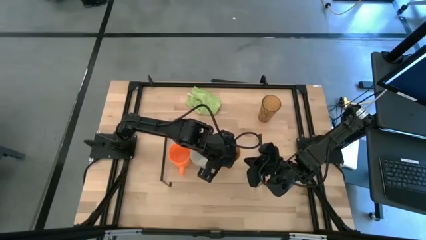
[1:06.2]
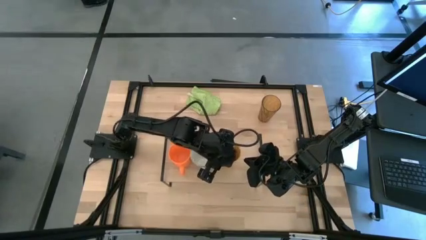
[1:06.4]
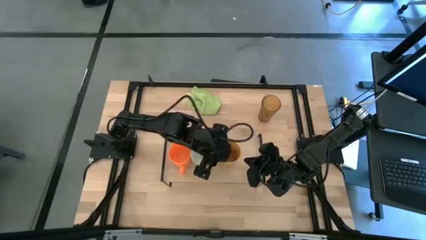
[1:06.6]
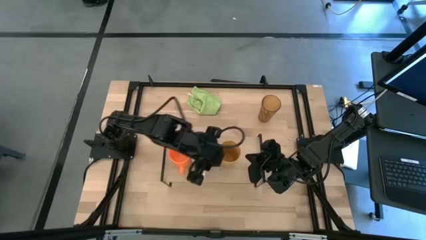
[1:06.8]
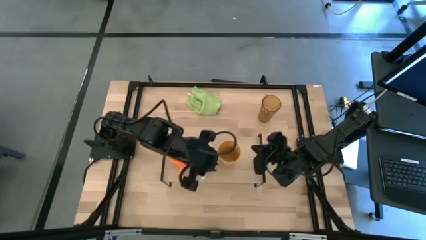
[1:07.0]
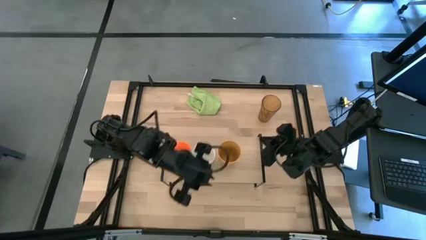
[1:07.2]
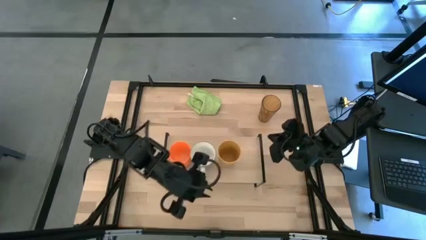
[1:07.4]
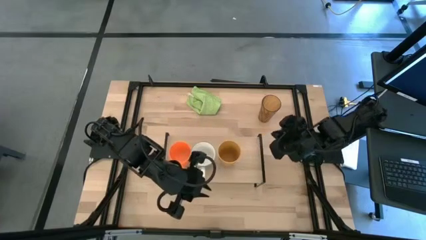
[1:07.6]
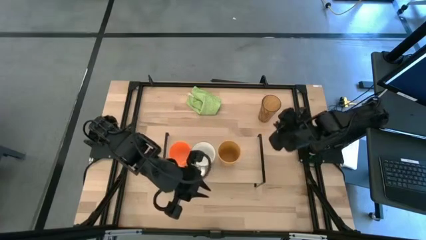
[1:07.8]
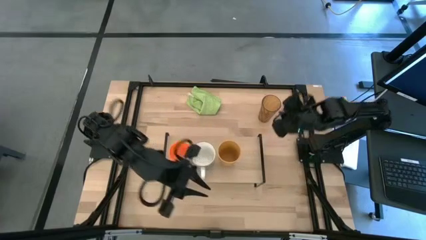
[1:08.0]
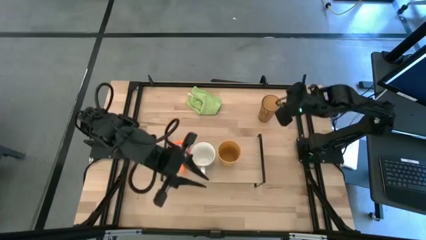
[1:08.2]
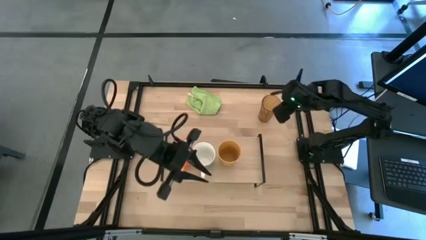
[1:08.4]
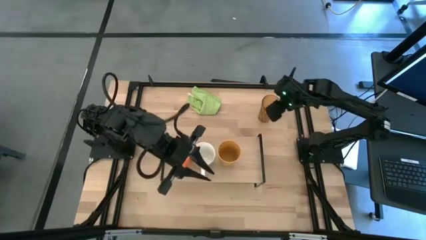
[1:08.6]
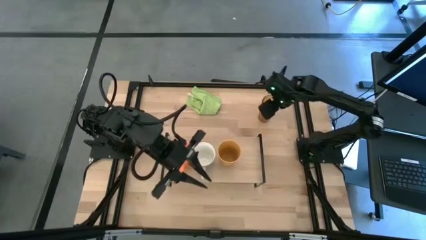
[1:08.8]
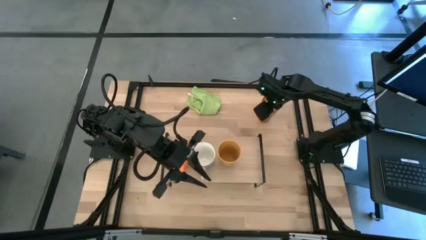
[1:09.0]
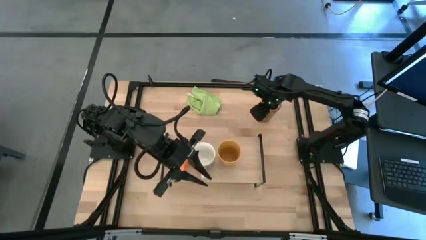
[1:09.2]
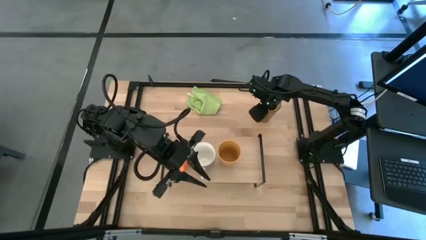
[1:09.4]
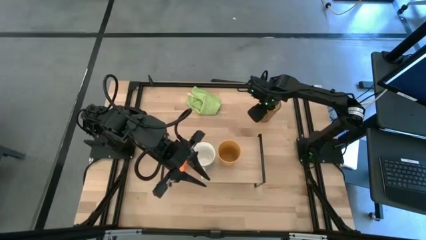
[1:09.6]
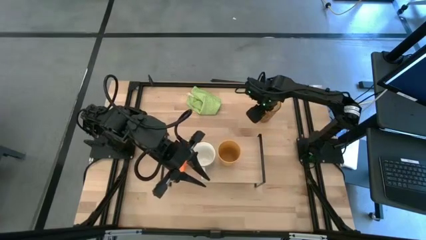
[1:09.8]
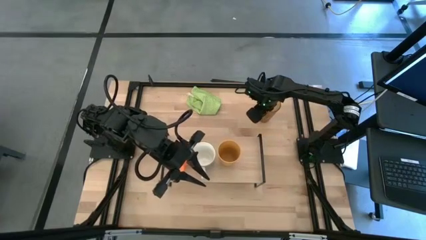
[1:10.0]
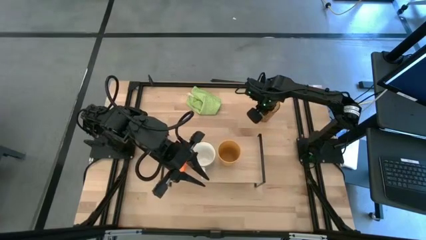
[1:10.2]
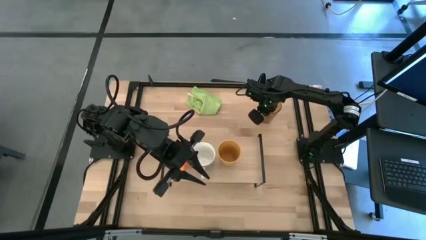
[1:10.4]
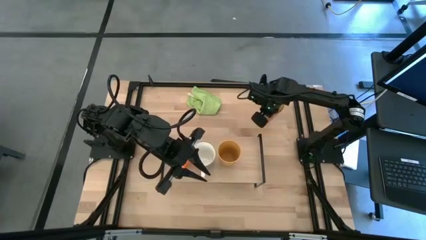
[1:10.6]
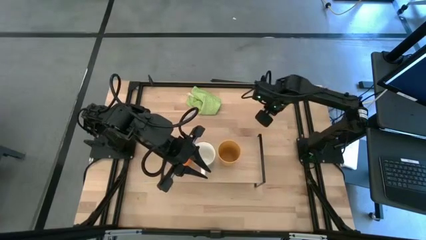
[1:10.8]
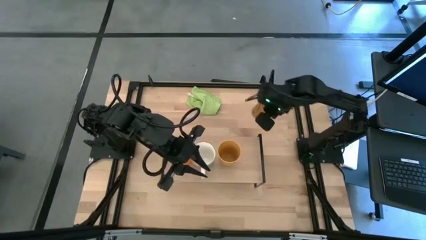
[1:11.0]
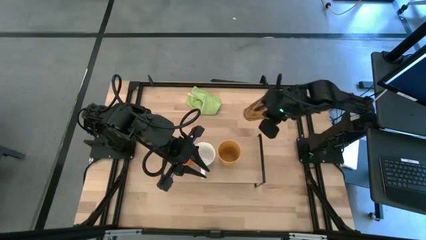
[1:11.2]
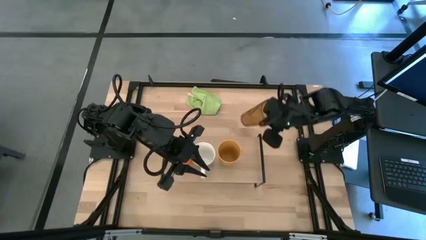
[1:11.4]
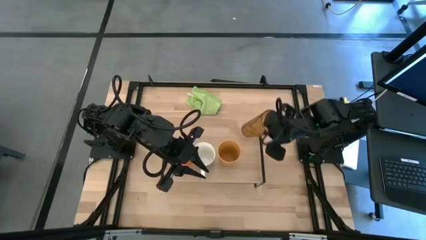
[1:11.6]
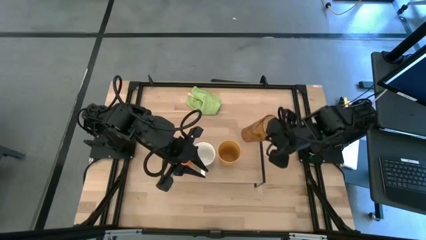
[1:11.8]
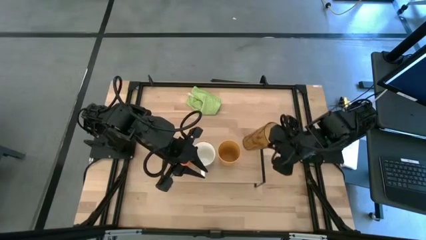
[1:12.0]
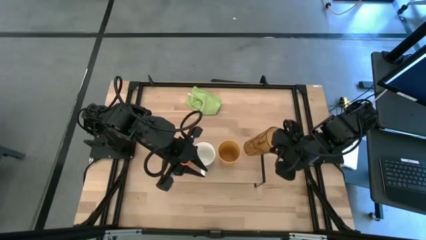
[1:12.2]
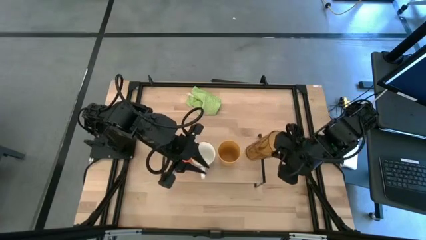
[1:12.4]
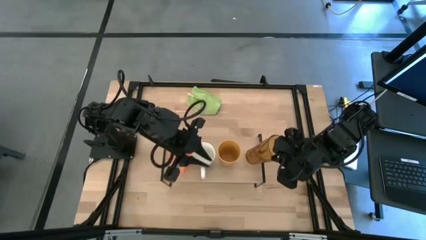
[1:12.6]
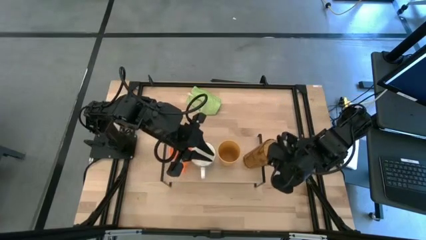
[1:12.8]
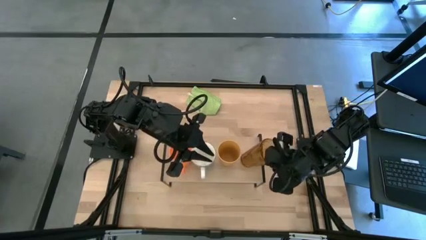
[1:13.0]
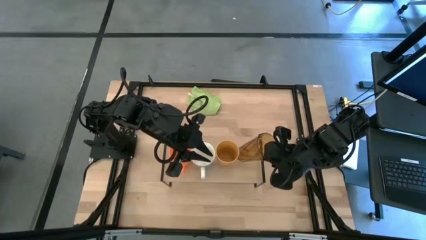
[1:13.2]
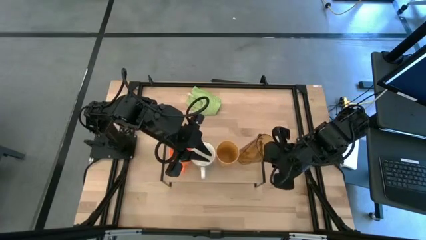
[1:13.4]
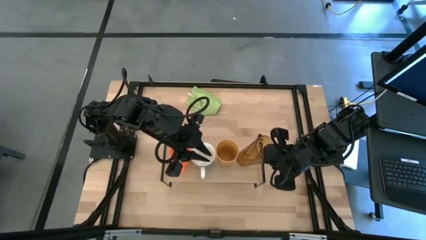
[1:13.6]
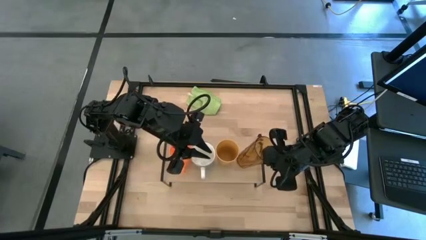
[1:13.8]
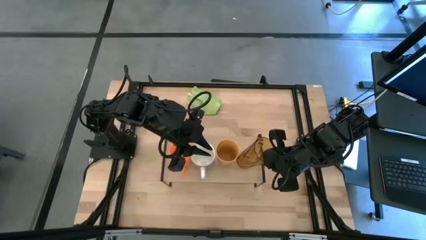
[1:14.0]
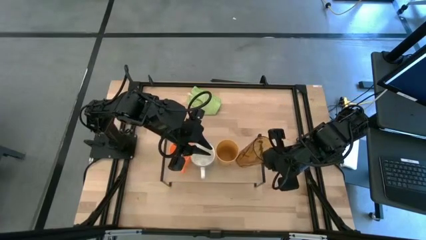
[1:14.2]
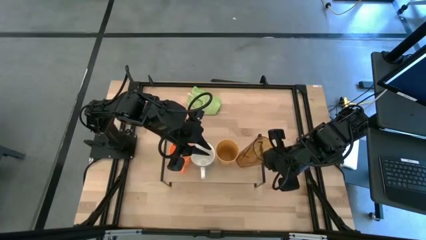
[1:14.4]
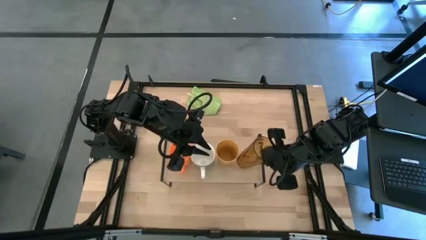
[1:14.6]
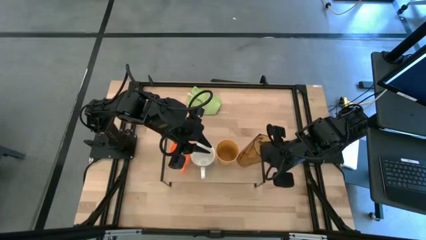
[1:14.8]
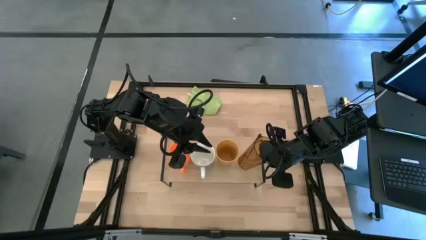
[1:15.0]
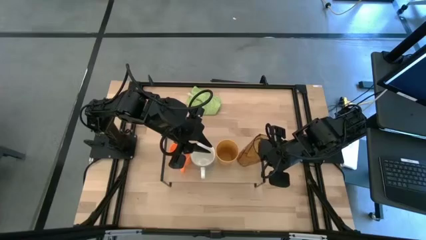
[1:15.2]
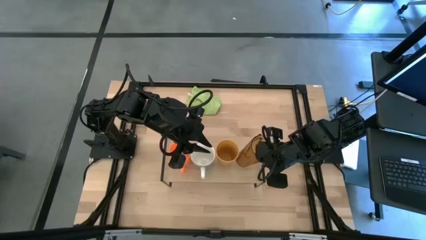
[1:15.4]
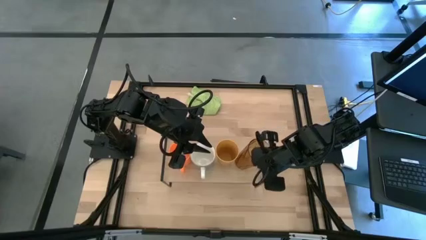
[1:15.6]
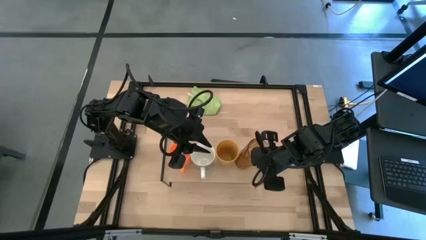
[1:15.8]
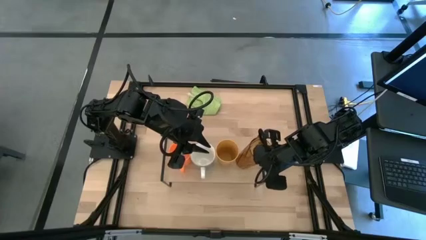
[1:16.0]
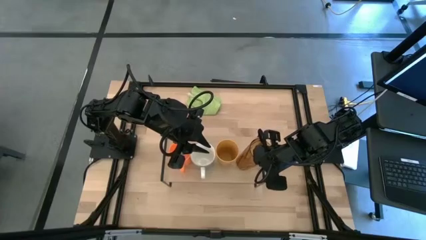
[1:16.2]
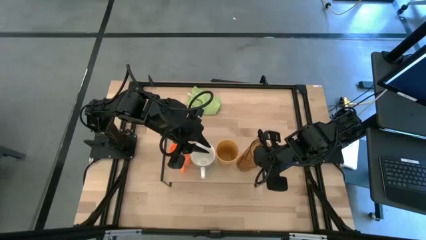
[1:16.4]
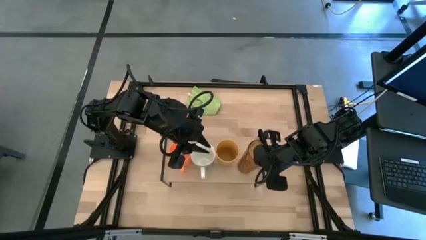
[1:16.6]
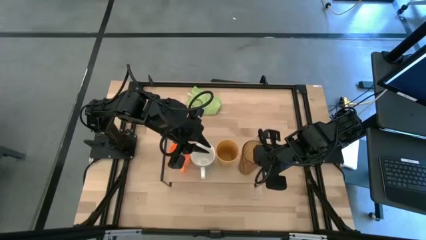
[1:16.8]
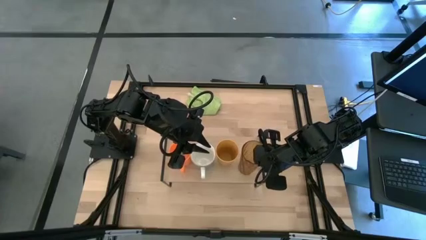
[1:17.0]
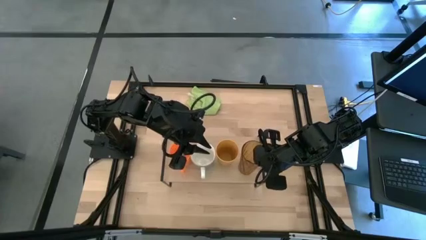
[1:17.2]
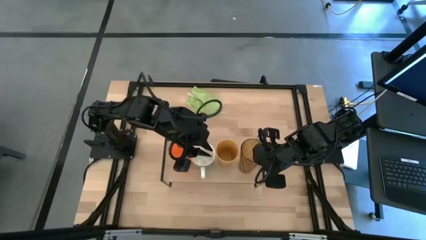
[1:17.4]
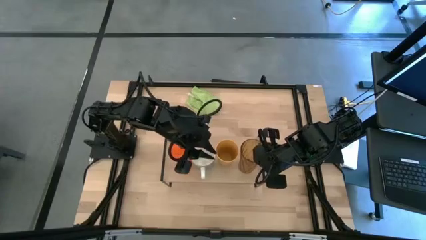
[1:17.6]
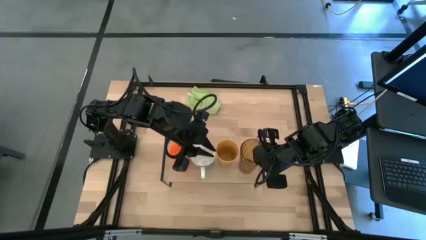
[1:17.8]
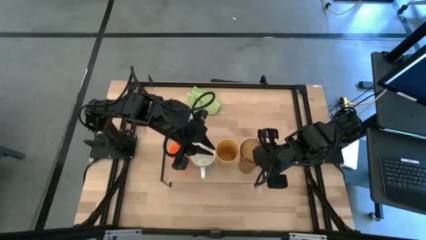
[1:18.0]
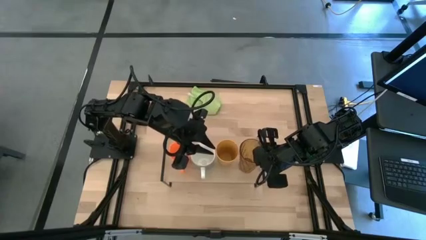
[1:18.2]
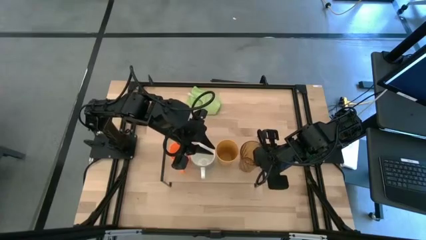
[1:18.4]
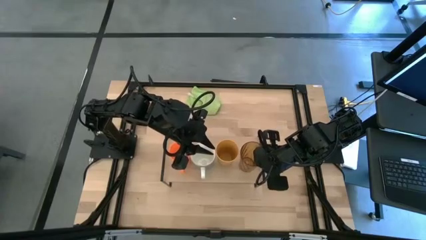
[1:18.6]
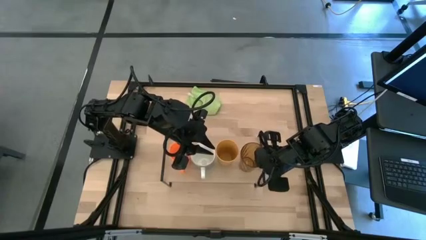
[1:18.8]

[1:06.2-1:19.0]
Task: Stack small to large cups/mugs on shelf
Put the brown cup on the shelf
